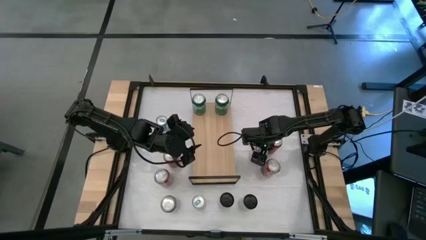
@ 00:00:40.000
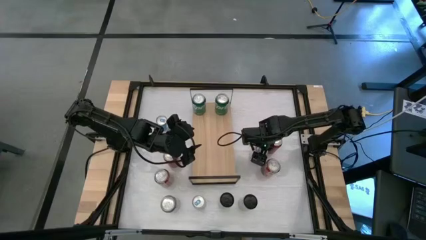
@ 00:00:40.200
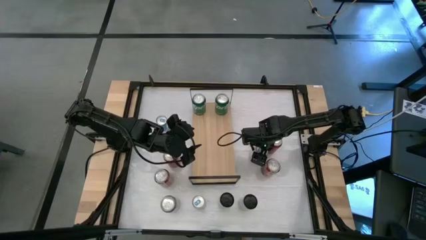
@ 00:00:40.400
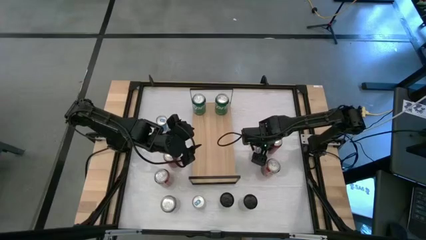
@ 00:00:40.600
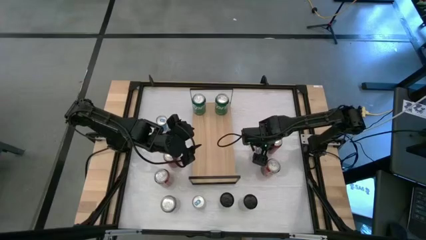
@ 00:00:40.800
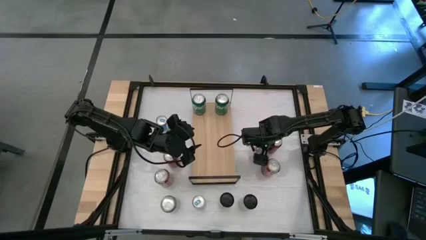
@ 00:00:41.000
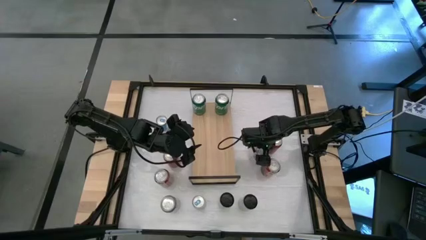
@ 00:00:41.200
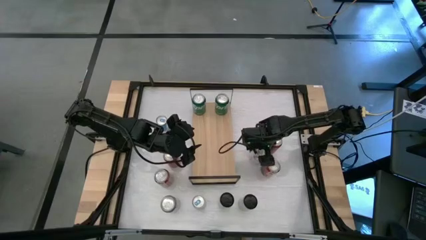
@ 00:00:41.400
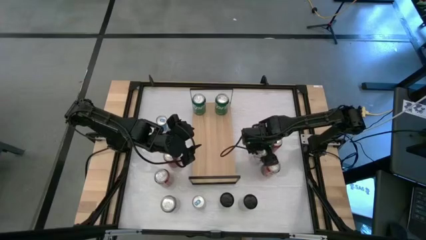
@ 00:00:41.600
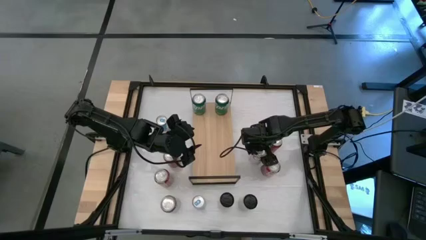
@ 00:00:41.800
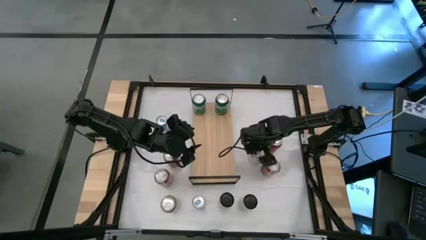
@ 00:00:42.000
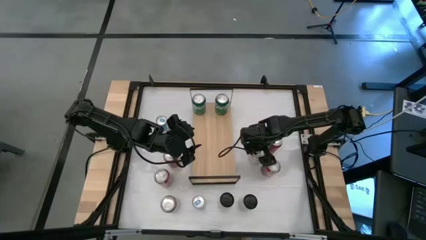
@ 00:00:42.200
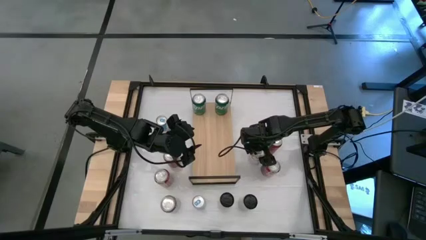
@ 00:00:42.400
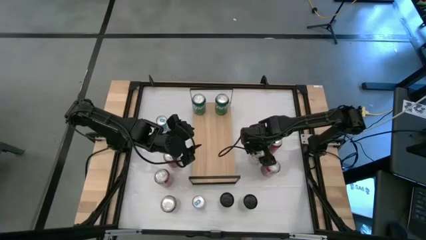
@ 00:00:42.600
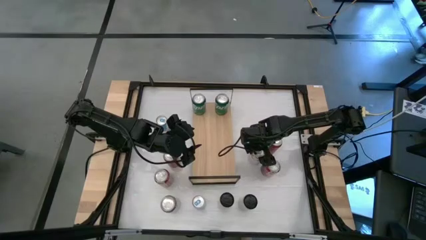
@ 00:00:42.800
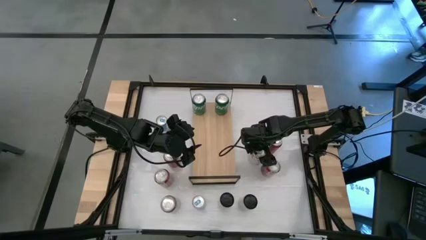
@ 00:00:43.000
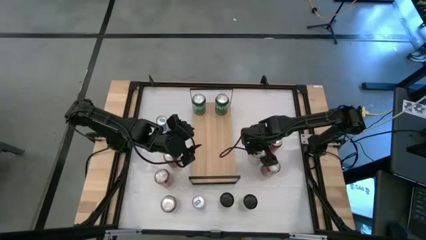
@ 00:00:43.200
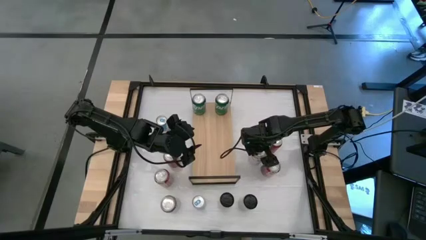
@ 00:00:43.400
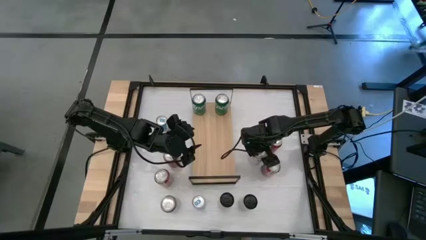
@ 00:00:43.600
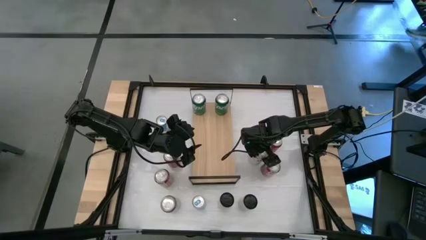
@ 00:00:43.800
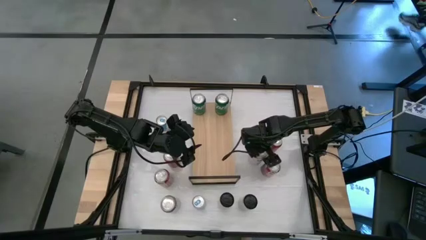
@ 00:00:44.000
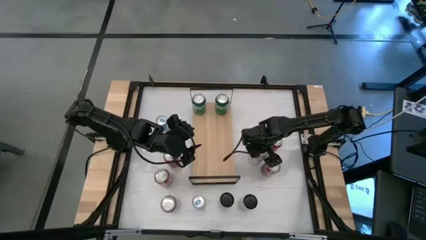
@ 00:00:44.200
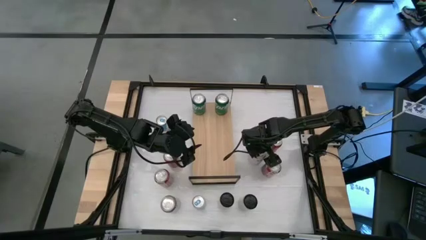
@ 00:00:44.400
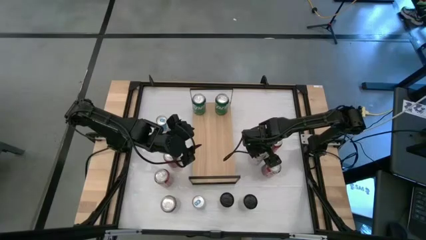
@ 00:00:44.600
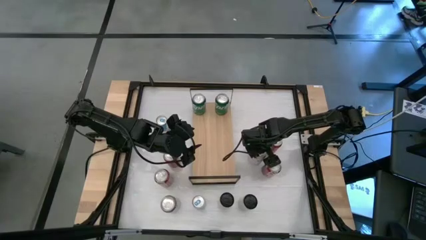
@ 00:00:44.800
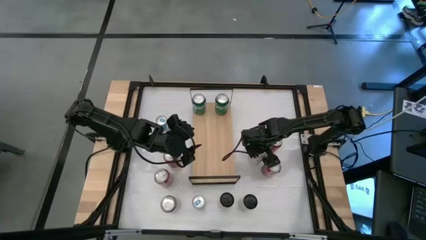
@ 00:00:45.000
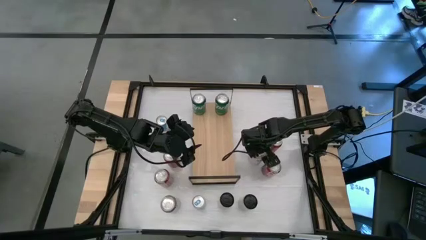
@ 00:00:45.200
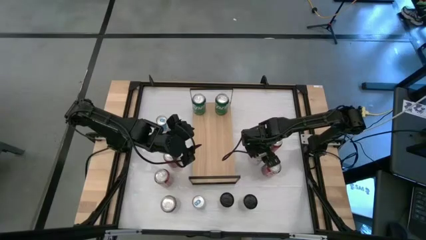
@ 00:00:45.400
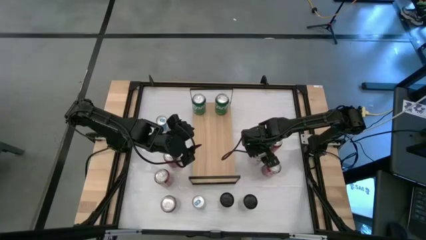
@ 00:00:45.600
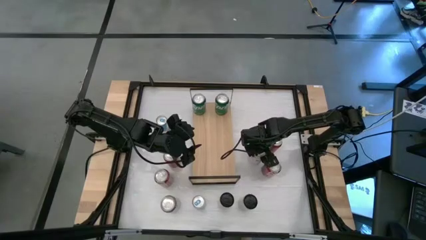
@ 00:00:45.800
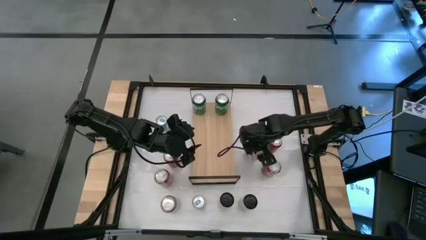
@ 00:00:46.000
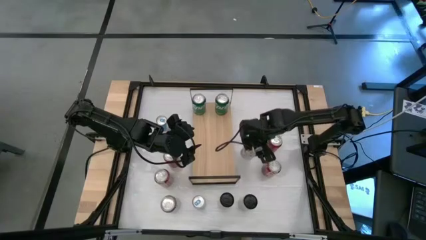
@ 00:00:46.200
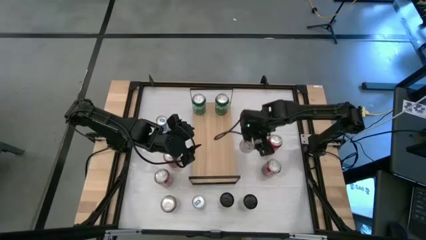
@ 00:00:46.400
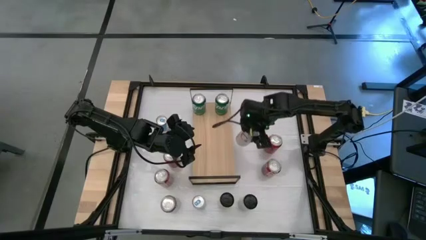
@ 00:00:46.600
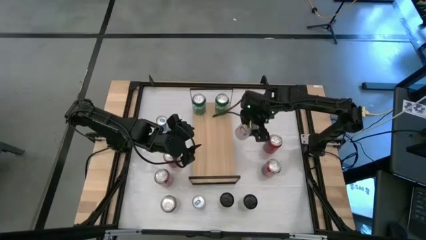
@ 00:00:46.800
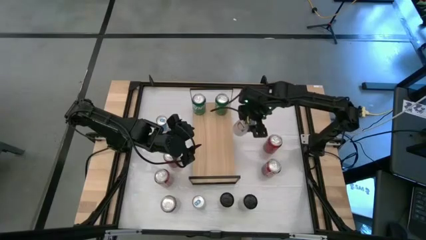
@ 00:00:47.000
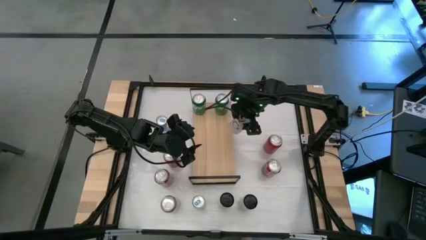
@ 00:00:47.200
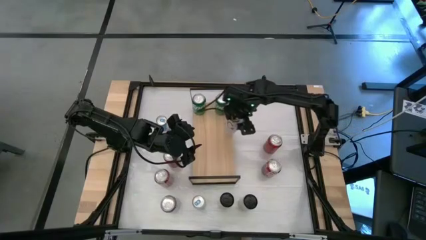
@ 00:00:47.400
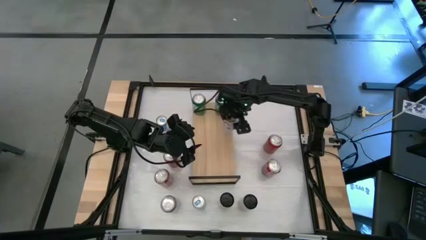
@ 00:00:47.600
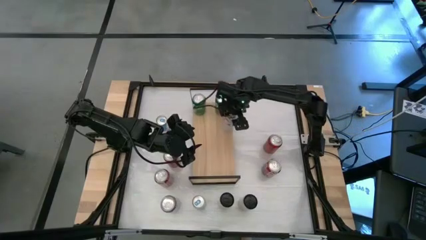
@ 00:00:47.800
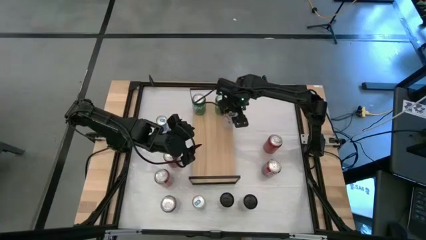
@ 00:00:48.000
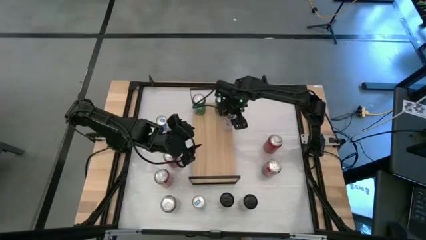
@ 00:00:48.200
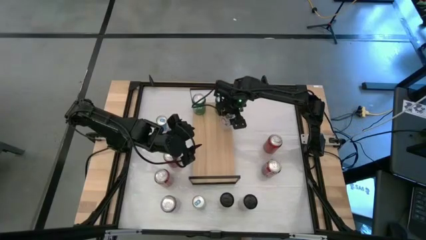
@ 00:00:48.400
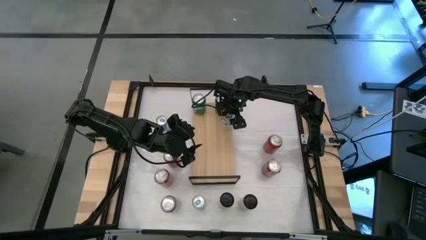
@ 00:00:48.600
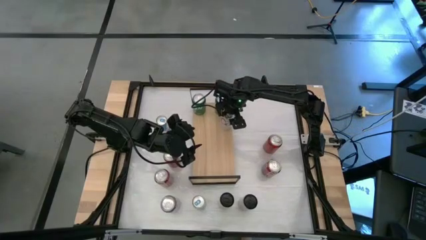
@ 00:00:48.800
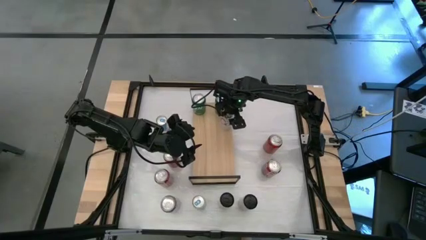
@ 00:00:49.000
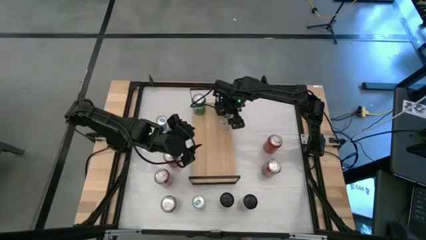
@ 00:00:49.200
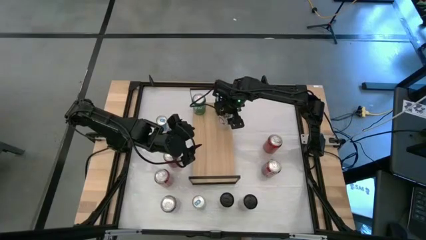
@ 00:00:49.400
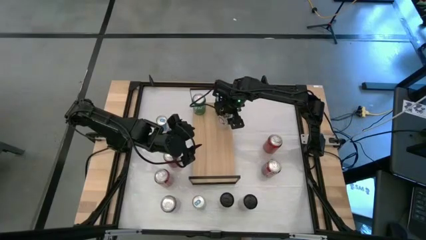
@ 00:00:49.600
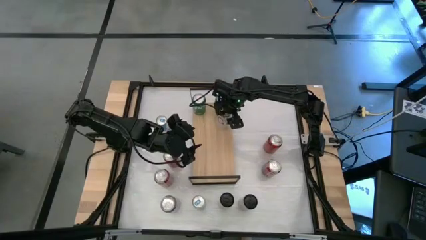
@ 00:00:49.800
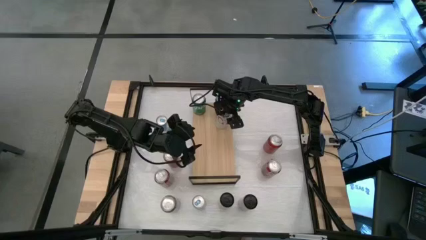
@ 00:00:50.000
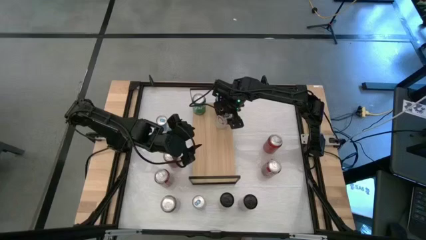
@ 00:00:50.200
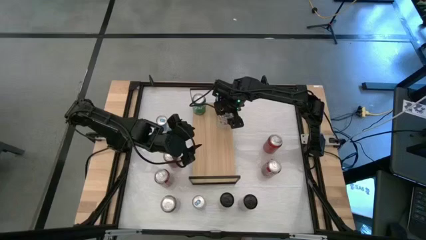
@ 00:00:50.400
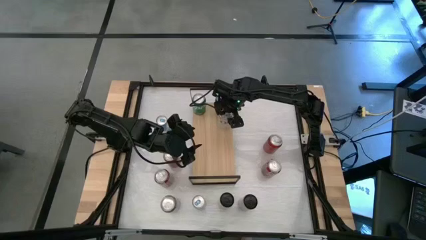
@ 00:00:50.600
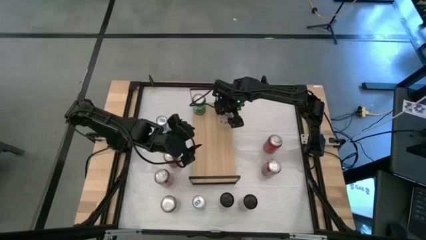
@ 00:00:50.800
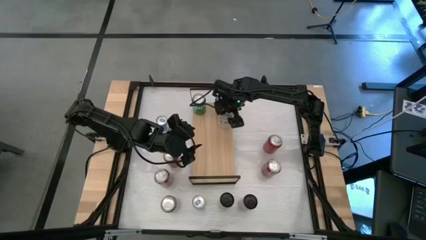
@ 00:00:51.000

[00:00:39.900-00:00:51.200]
Task: Place canned beverage on shelf
Put the top silver soda can on the shelf
